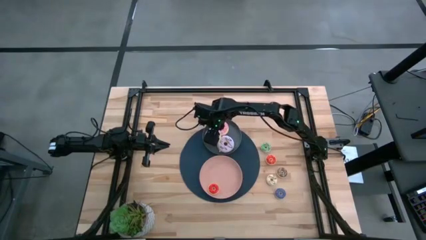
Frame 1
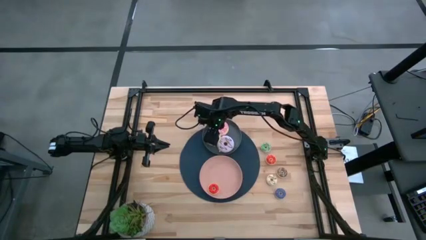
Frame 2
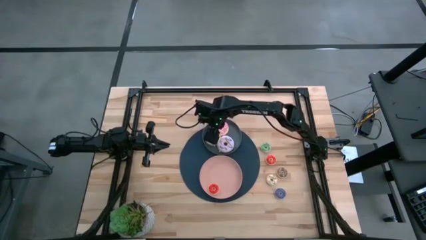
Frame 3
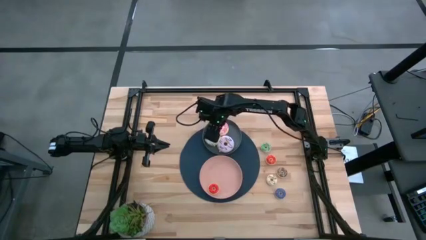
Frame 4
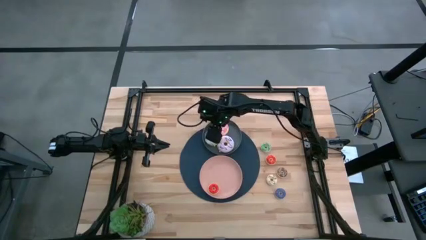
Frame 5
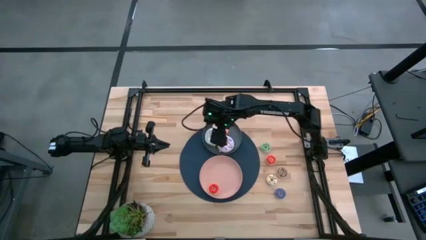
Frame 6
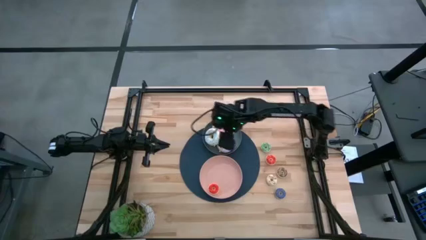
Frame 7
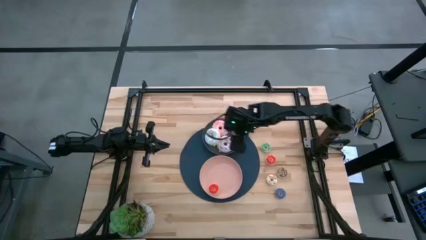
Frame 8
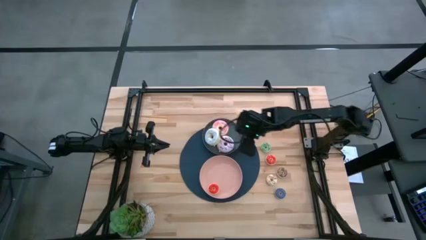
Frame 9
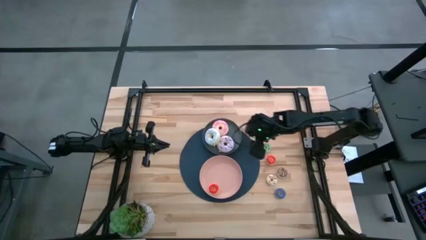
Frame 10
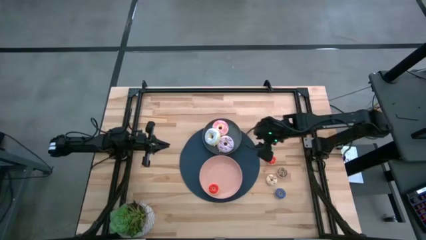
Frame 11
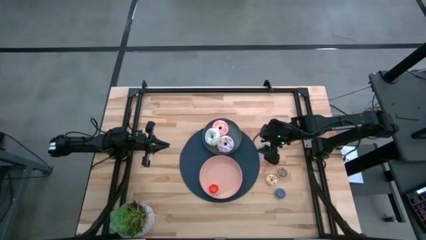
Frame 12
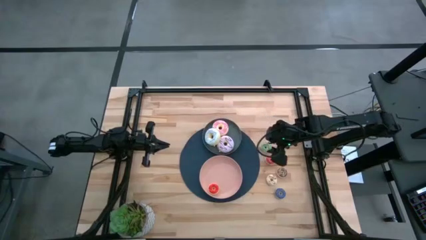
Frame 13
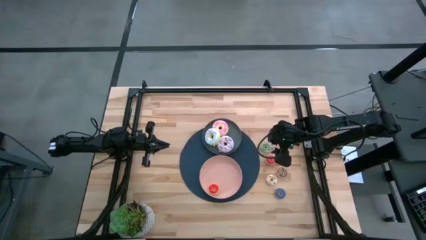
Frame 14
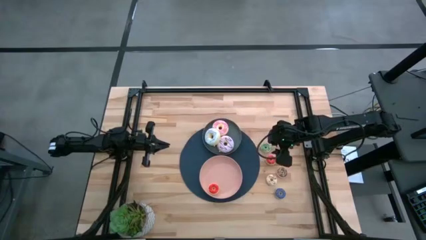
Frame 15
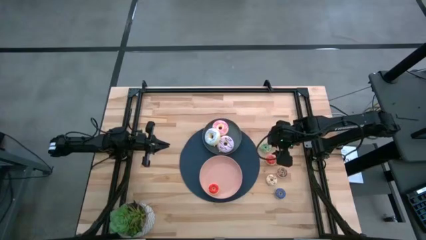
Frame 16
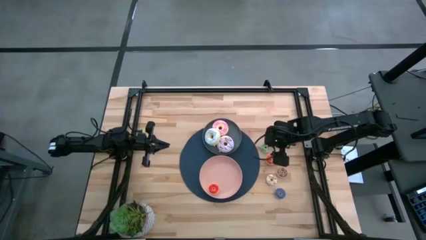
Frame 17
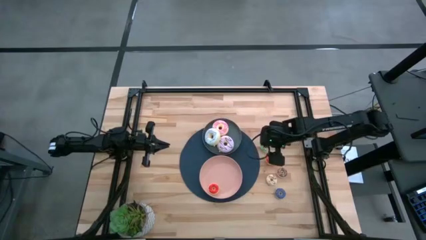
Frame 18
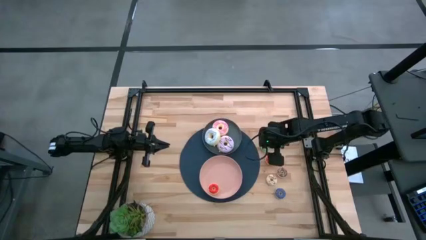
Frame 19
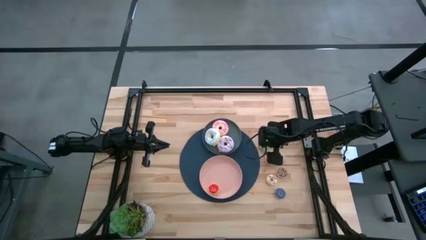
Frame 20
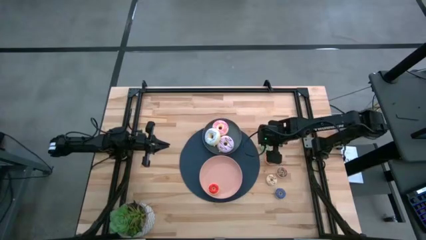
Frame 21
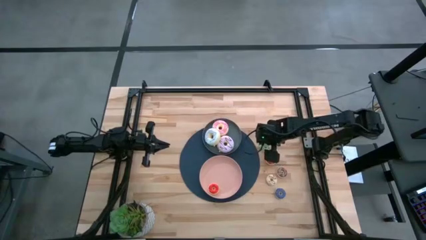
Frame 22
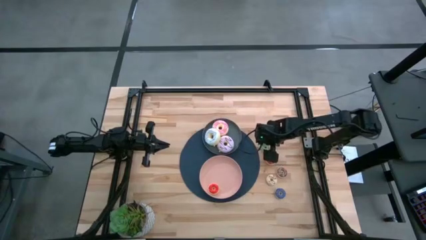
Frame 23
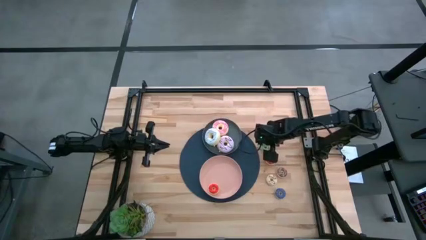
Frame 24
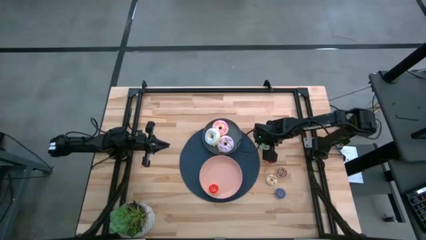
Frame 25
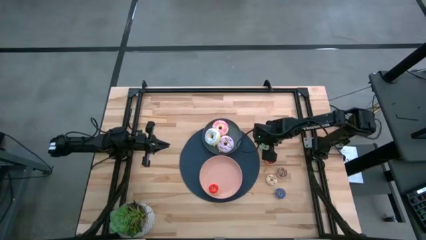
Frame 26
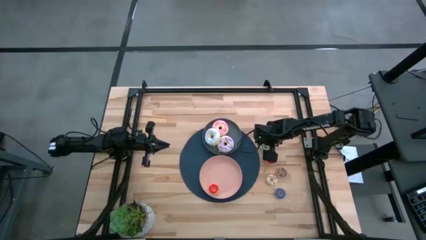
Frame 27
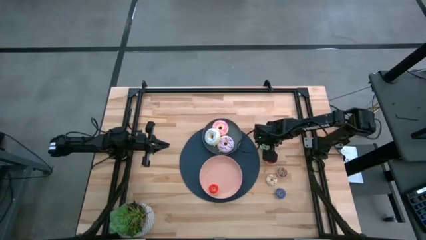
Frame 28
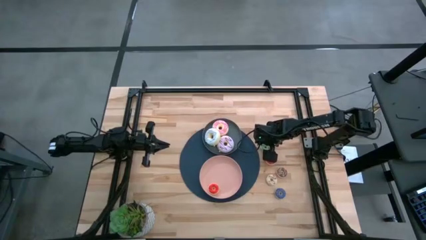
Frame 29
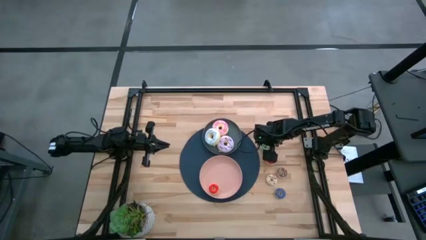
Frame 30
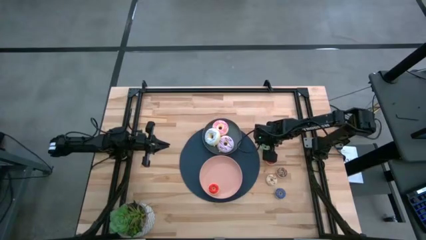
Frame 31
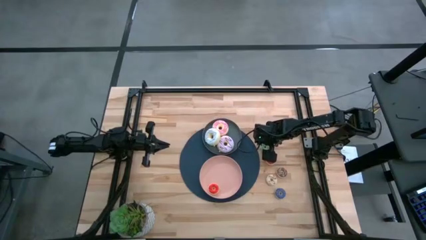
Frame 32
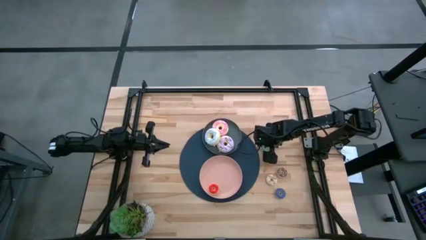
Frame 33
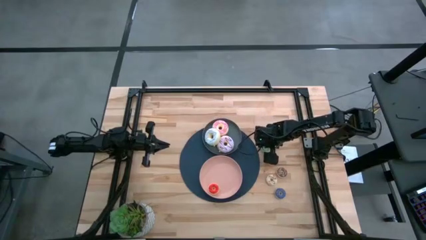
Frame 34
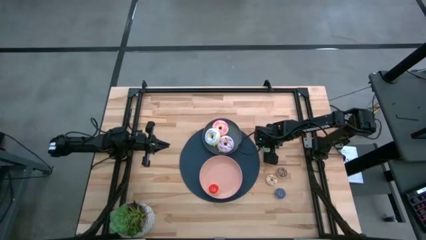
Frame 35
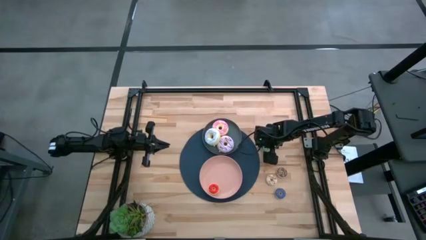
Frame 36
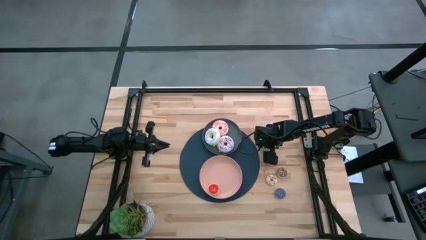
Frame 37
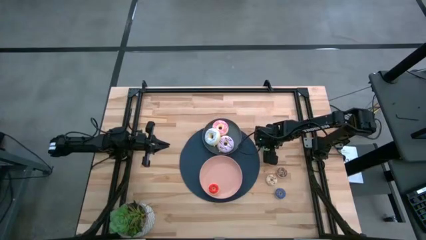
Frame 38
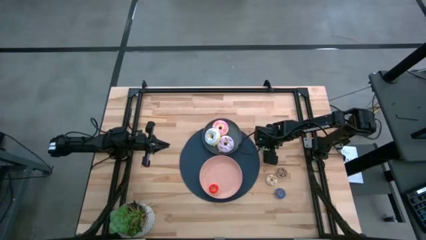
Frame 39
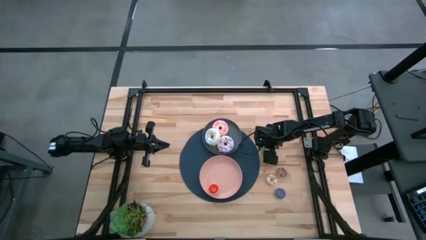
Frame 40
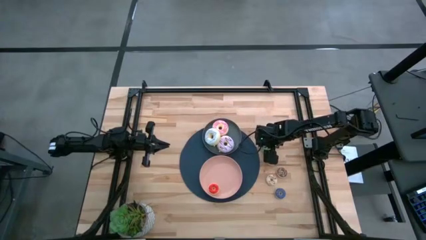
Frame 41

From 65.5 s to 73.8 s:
Task: Pick & Place donuts
Put the small green doughnut into the pink plate

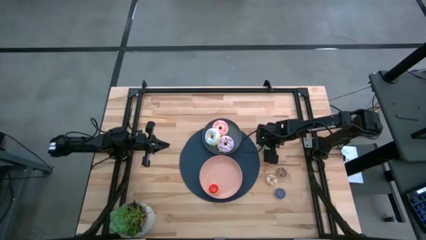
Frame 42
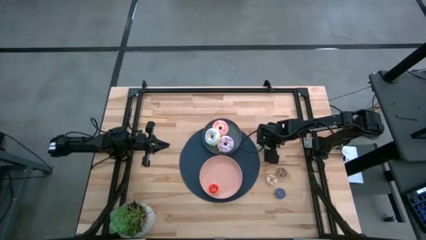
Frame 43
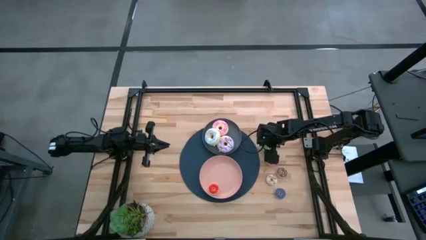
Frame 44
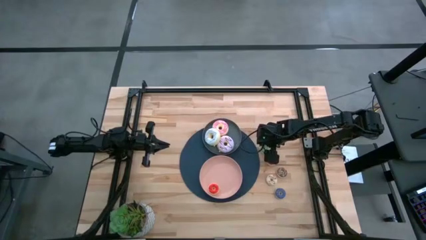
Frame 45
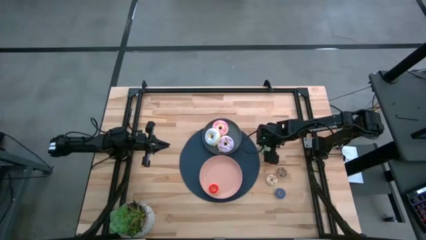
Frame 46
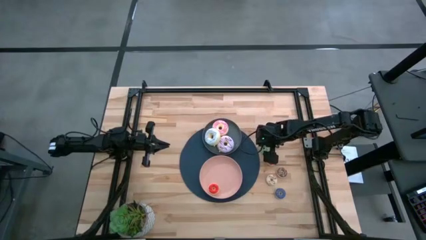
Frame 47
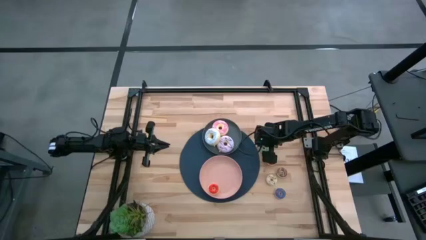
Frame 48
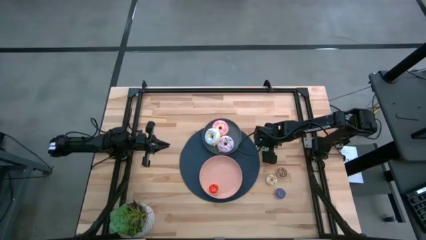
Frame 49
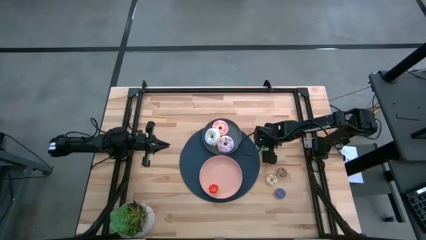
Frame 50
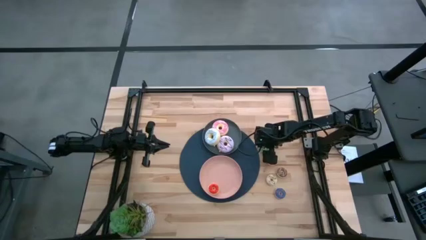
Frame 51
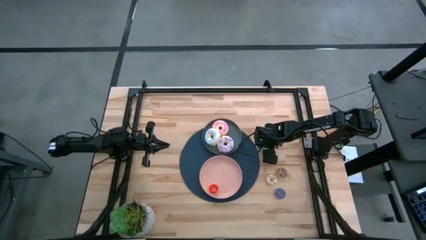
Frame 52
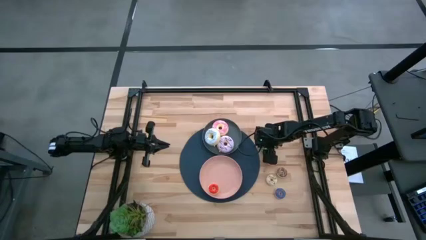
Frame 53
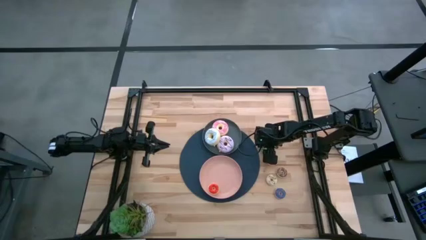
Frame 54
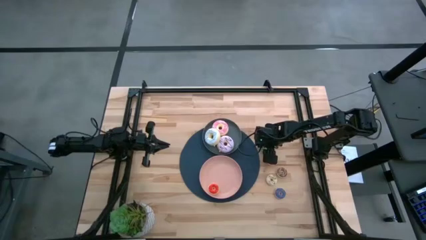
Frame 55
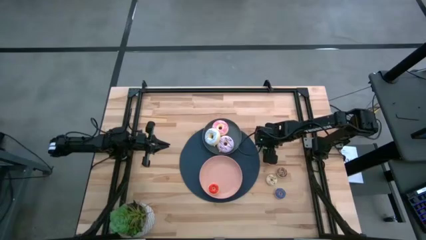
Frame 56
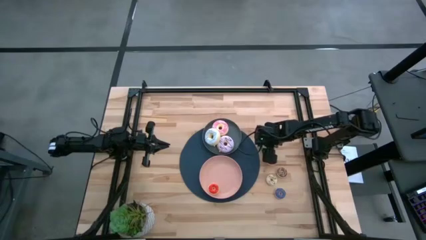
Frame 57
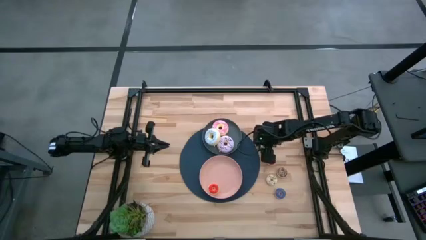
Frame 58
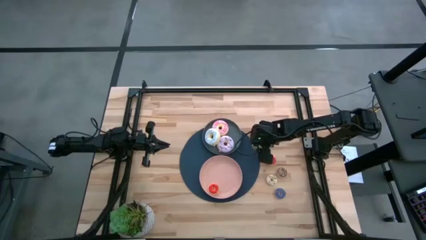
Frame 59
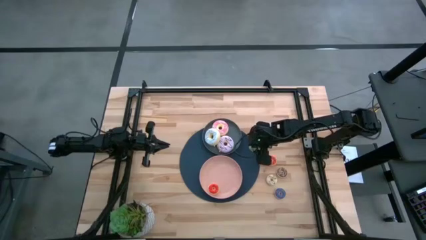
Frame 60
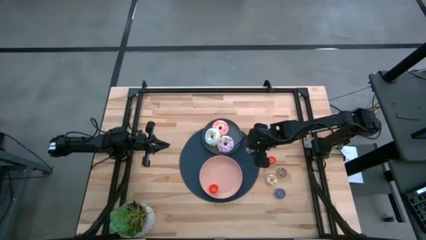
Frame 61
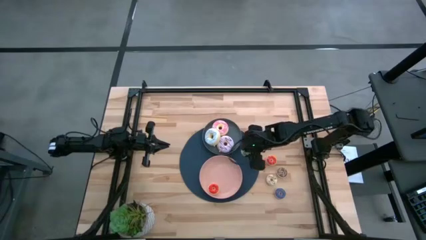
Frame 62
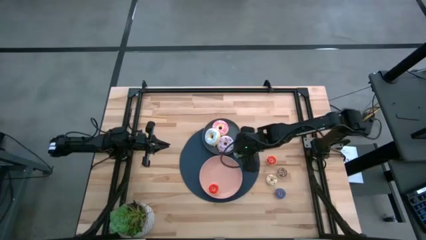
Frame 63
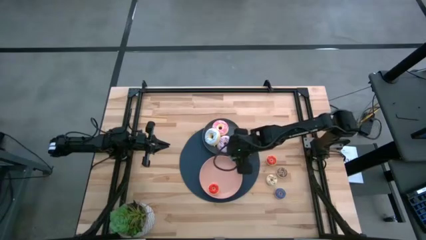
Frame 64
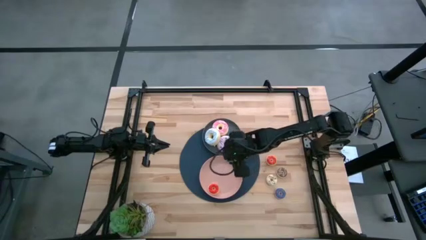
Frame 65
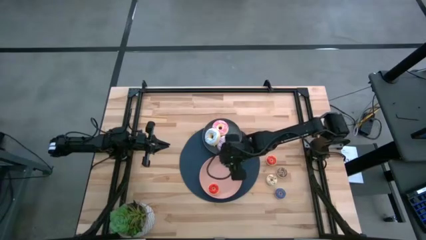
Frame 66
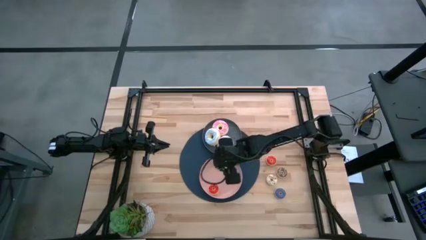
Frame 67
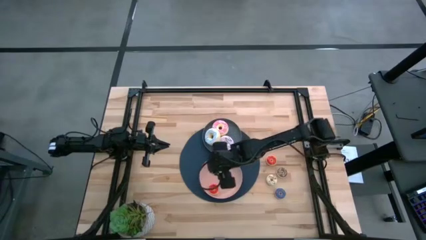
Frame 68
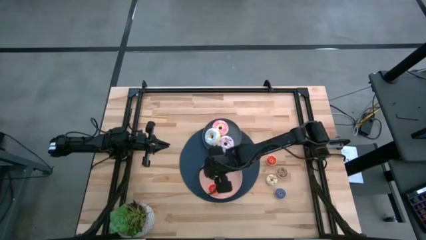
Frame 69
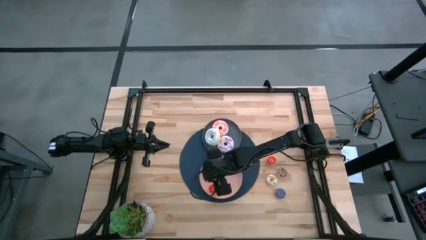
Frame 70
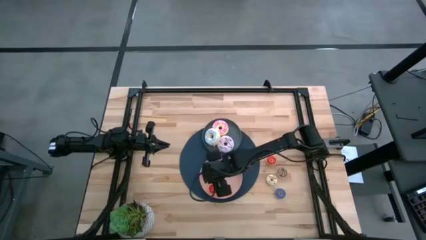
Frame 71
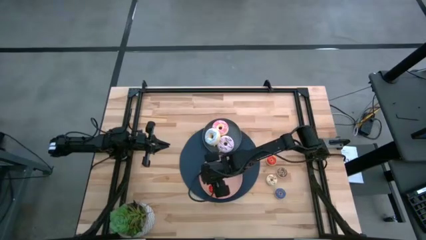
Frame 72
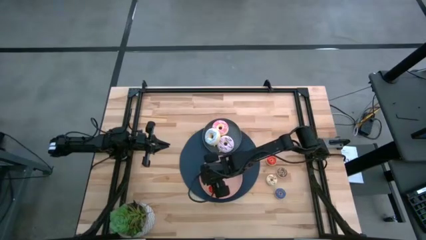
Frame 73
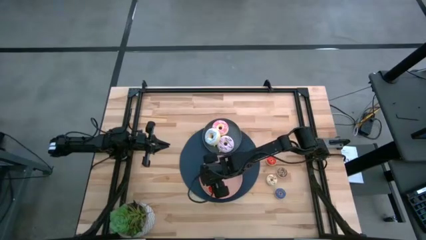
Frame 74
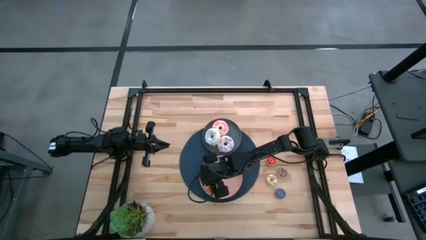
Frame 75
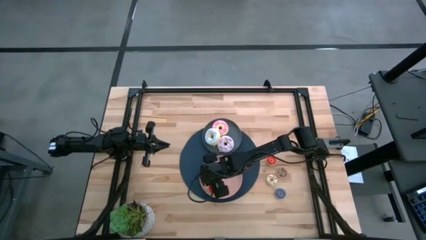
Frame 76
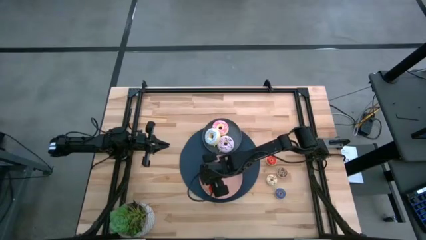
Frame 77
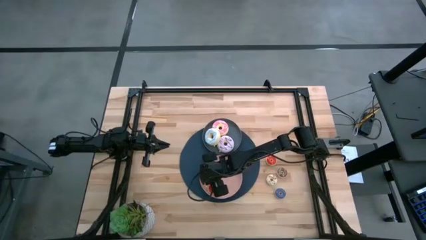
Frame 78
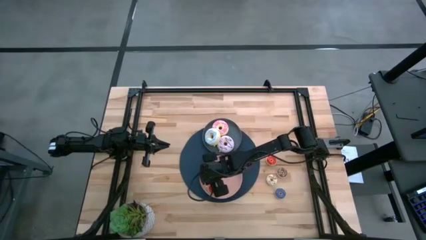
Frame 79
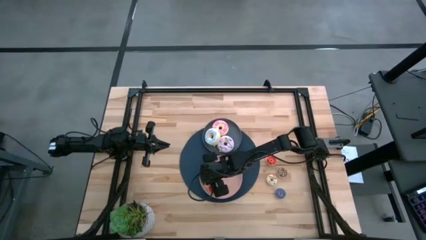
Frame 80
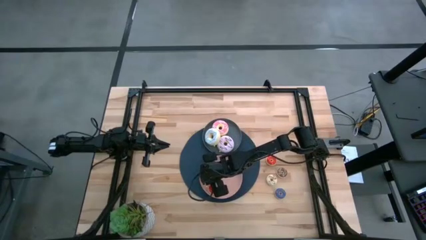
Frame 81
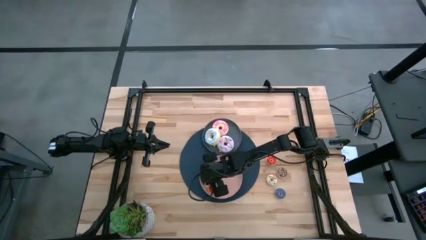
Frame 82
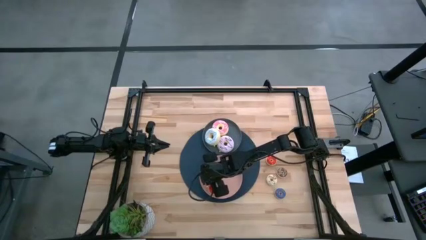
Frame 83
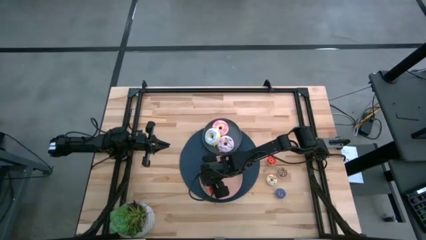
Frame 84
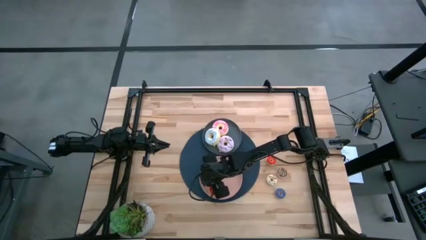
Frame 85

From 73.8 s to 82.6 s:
Put the small green doughnut into the pink plate
